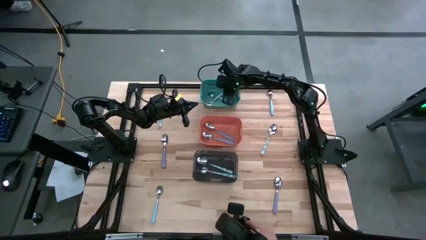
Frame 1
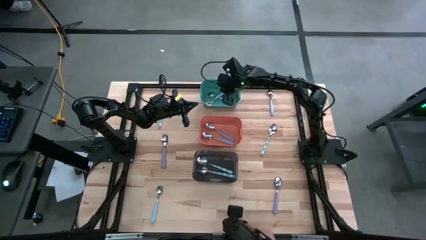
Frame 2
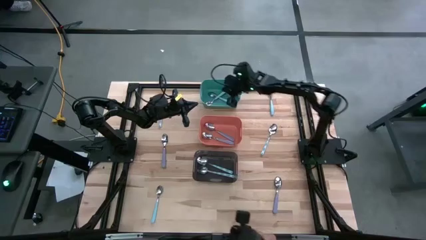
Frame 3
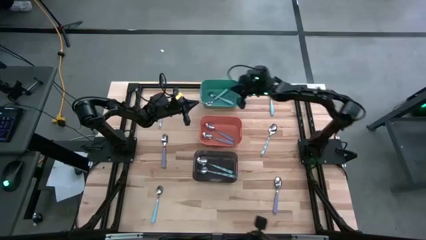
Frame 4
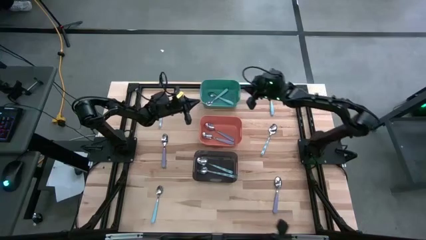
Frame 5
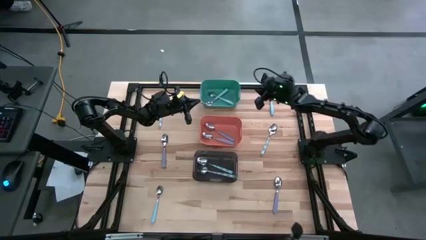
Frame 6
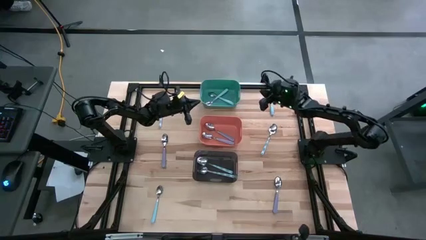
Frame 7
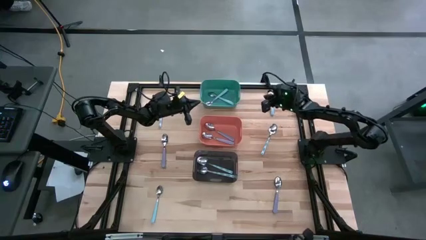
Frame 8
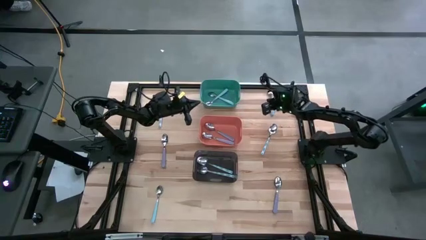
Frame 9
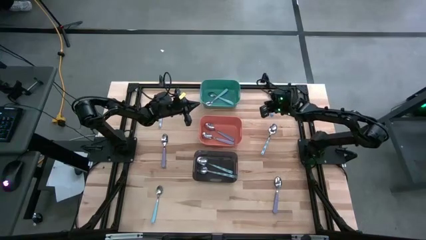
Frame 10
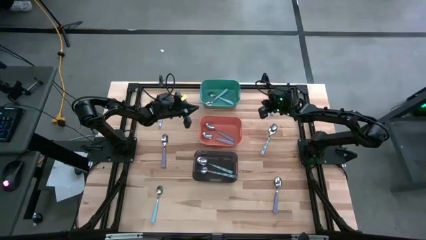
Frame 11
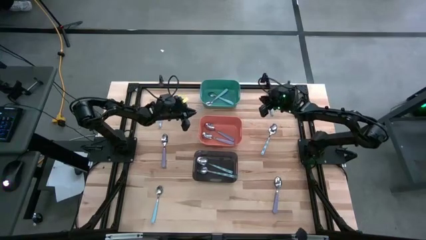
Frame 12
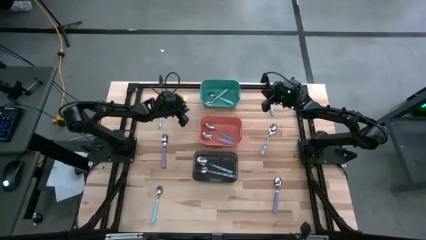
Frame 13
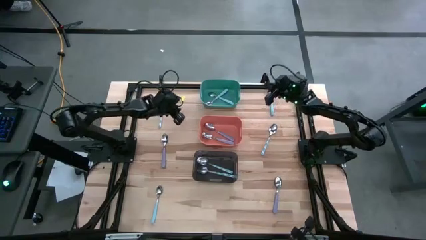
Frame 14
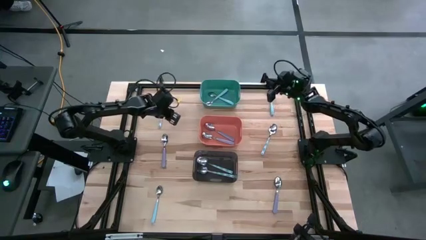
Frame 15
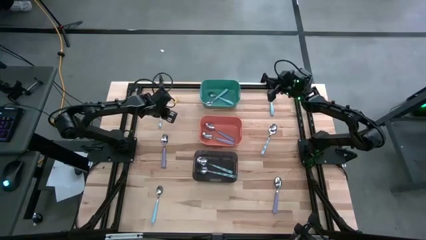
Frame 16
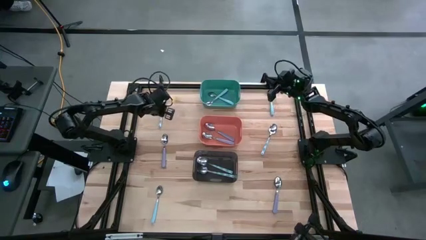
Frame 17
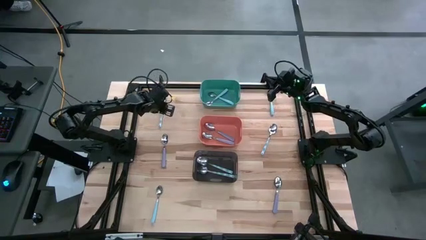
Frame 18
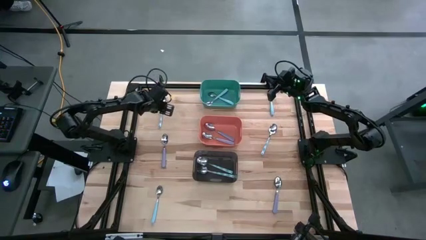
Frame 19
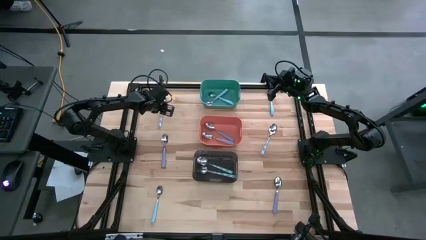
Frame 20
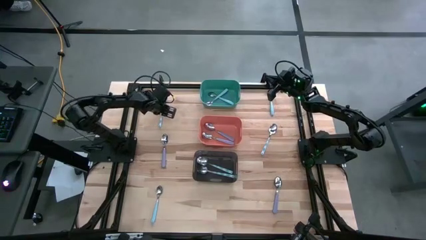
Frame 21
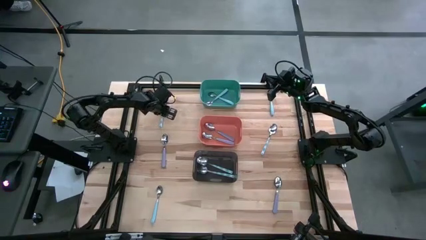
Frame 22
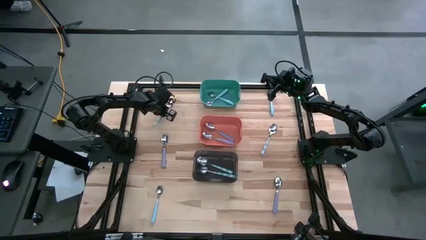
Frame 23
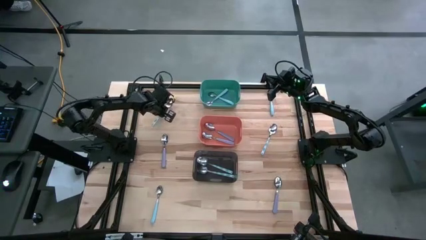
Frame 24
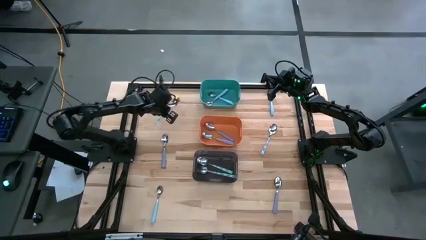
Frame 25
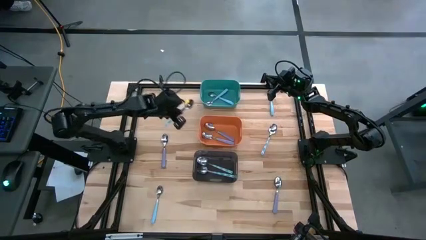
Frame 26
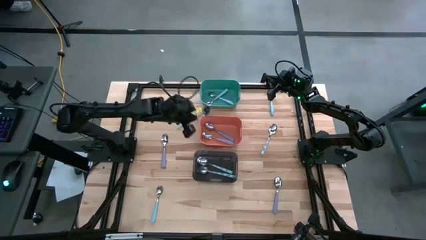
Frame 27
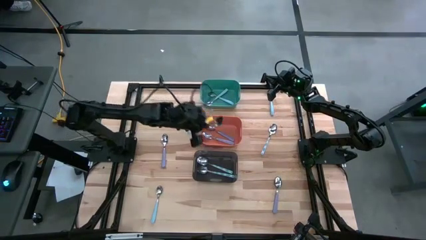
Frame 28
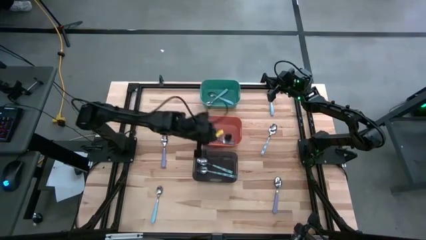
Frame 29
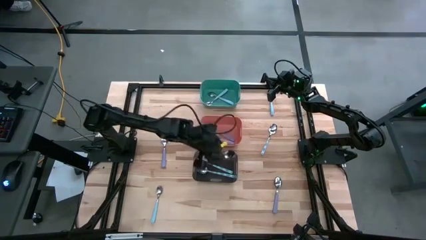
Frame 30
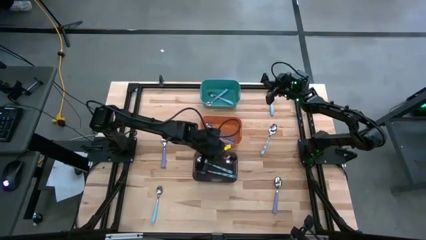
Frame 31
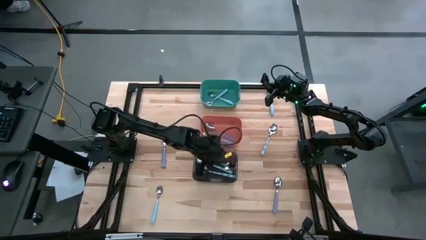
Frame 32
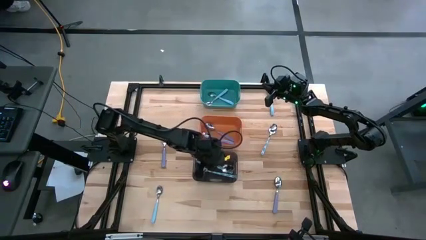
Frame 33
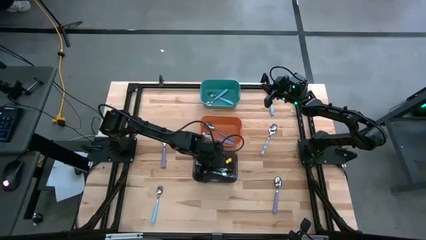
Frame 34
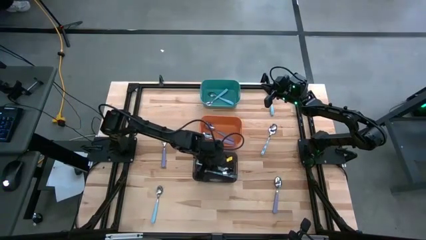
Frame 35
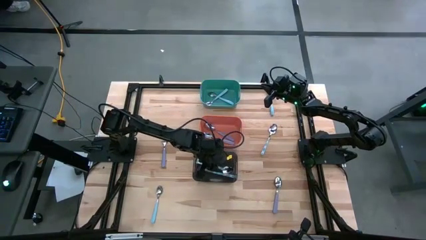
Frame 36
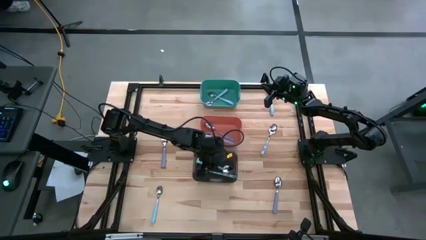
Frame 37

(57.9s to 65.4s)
Task: Sort silverware by color (type)
Put the top white patterned spoon into the black bin

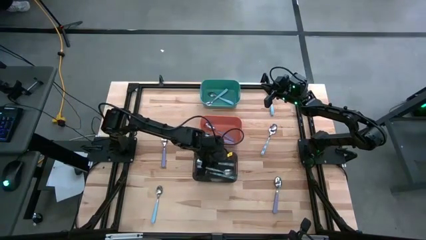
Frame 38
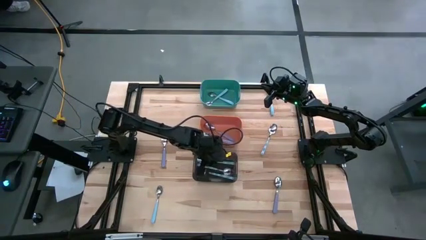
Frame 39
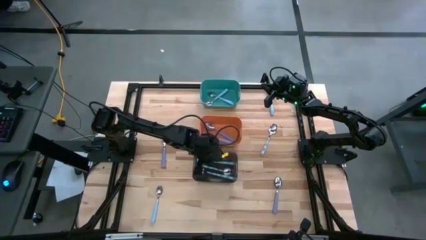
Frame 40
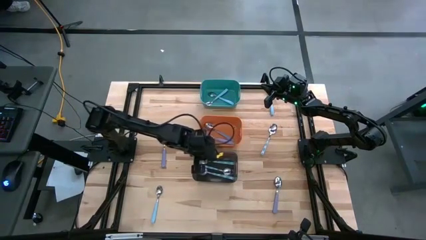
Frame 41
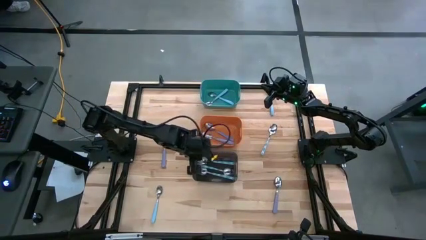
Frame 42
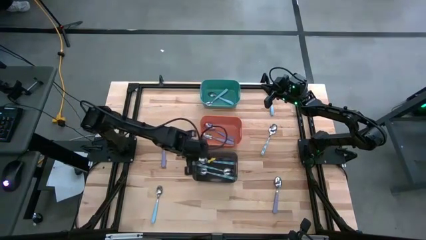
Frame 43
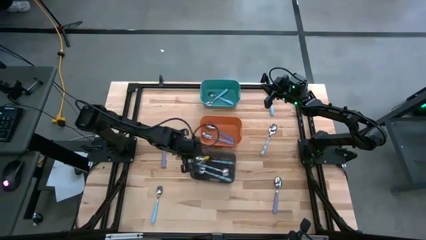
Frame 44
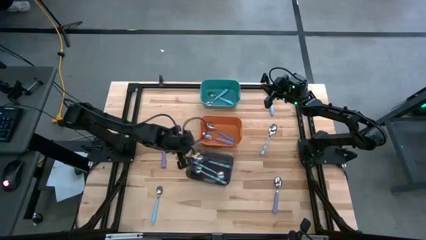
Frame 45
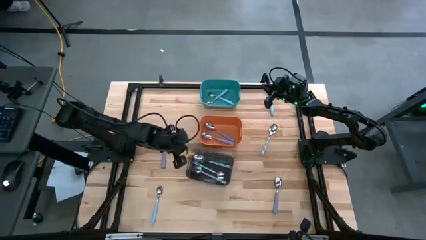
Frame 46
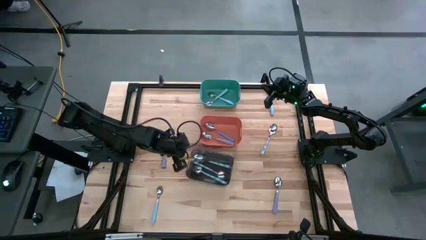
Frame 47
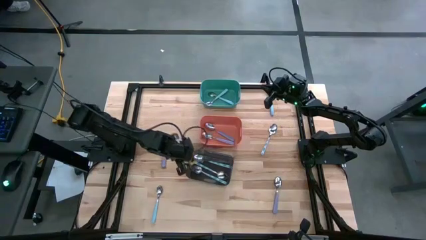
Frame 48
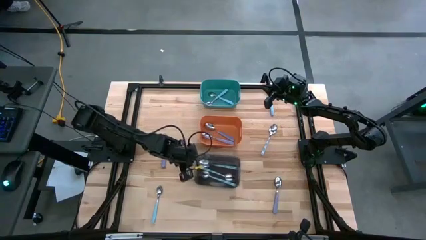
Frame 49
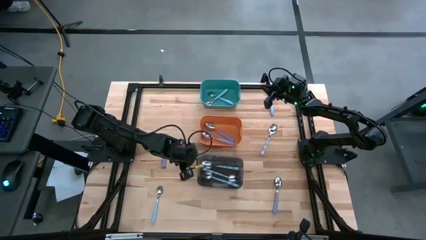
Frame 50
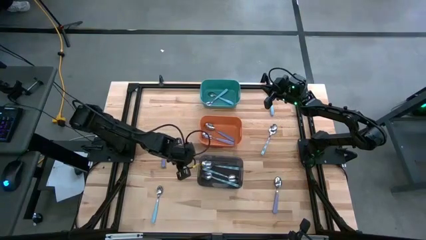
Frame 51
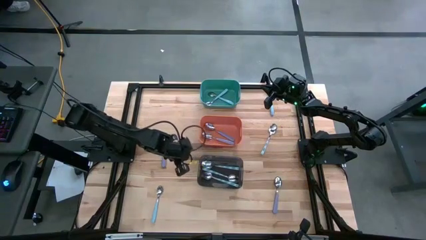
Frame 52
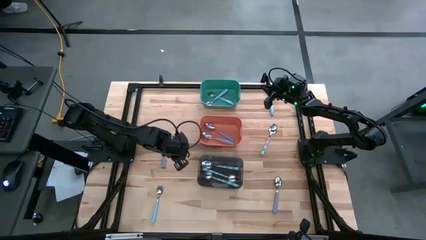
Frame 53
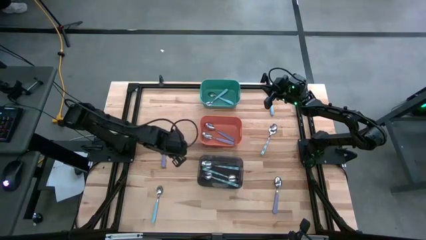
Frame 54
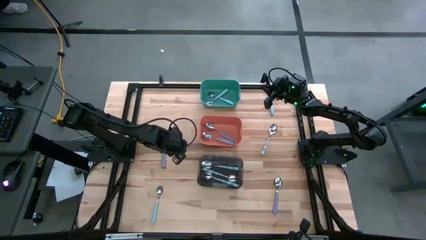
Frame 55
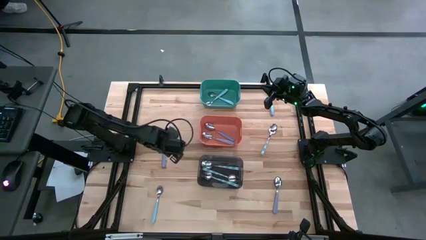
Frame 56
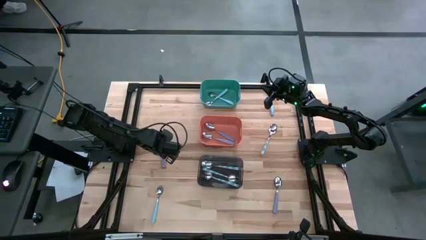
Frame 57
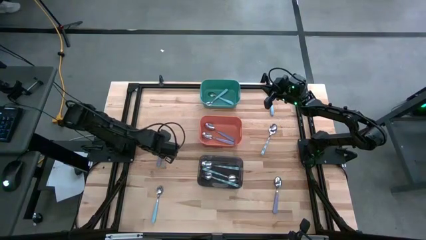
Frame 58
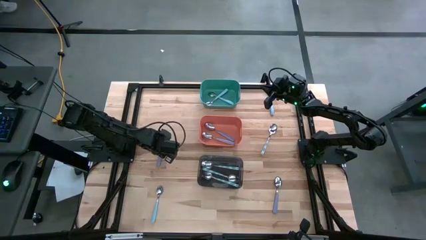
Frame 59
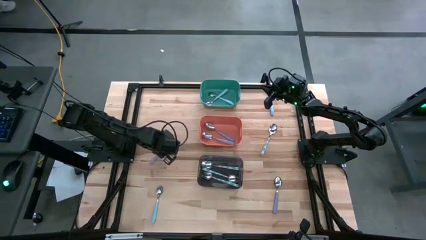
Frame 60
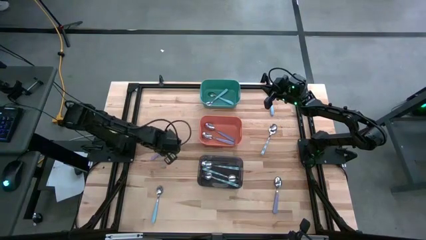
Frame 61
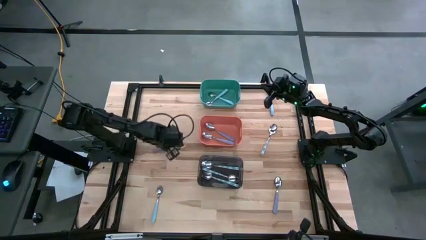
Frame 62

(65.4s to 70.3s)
Put the top violet spoon into the orange bin

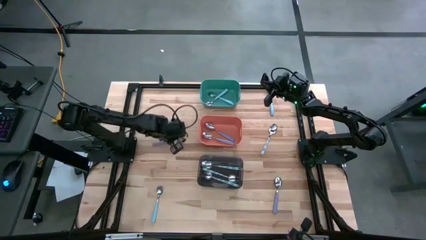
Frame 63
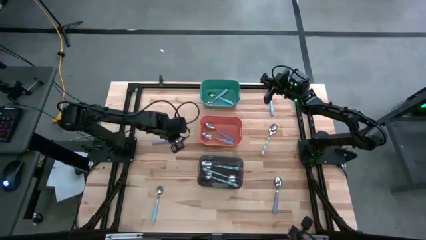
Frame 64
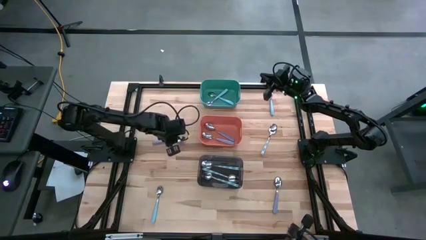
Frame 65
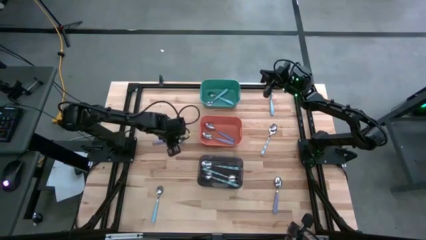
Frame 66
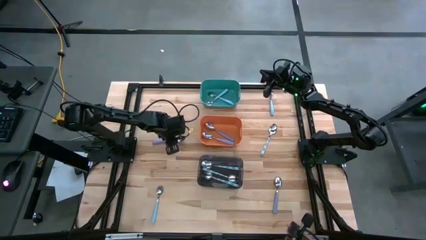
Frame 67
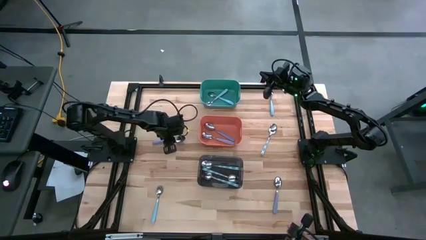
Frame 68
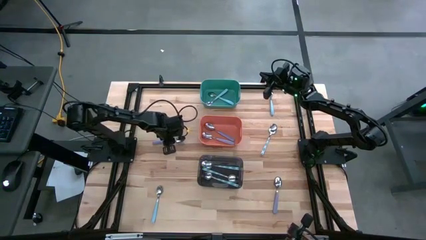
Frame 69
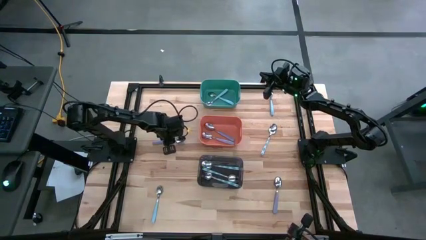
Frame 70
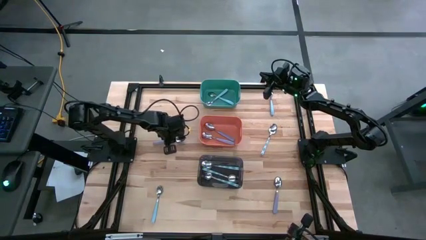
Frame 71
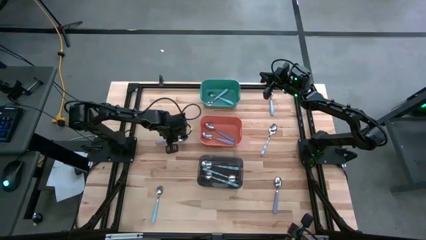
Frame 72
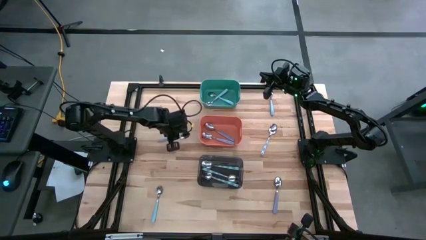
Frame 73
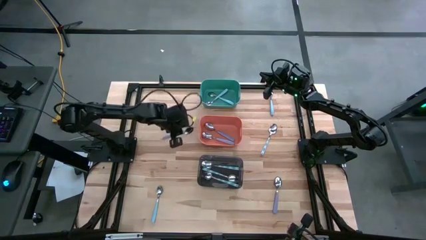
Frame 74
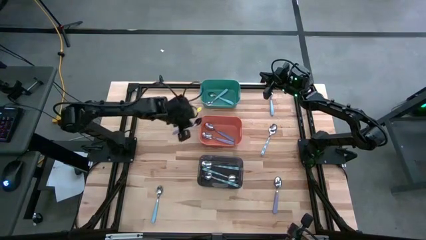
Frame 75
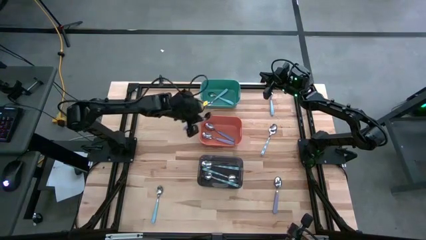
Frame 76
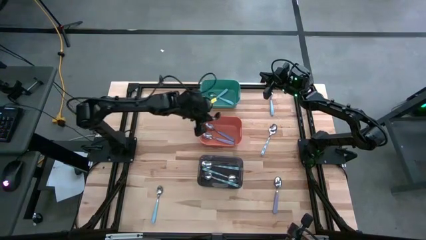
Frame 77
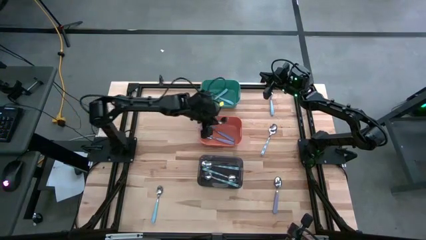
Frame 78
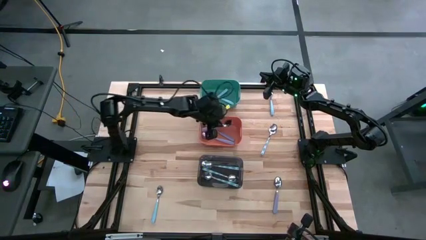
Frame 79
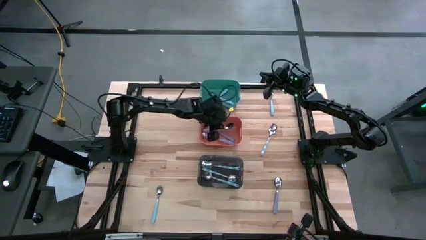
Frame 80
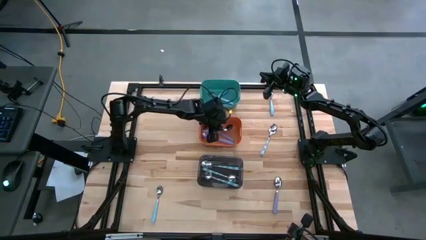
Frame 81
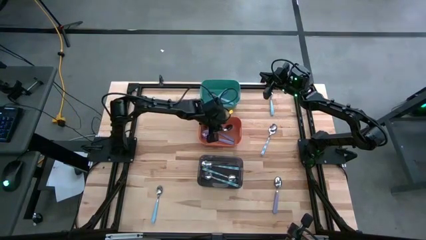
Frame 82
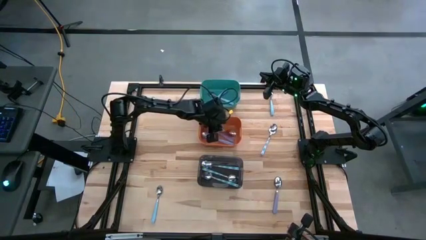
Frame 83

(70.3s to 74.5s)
Put the top violet spoon into the orange bin
